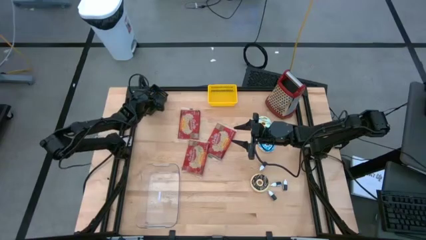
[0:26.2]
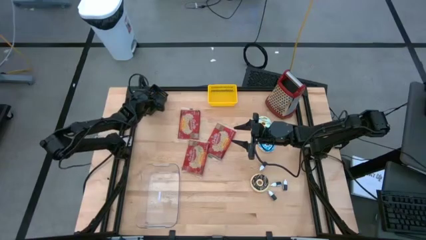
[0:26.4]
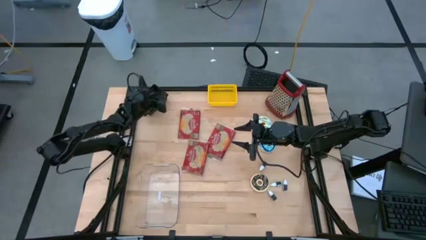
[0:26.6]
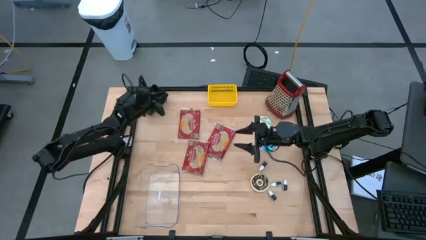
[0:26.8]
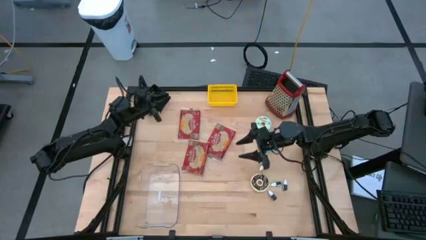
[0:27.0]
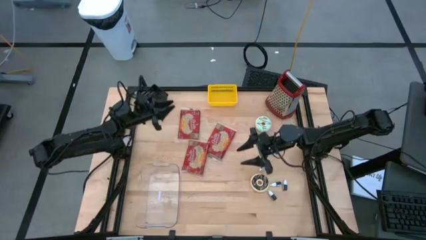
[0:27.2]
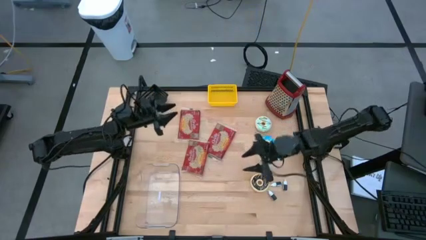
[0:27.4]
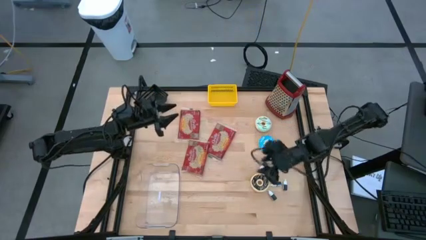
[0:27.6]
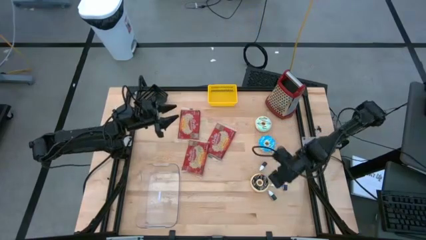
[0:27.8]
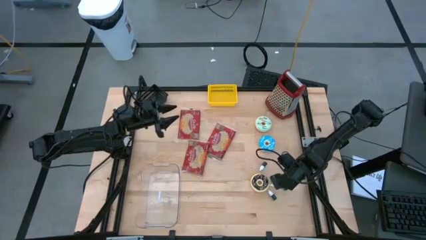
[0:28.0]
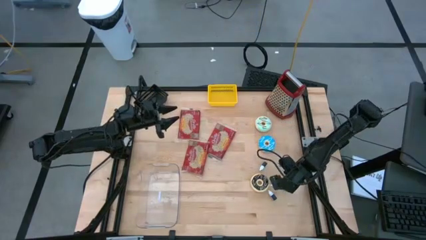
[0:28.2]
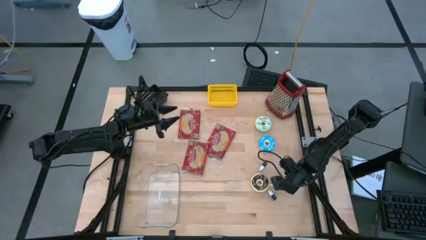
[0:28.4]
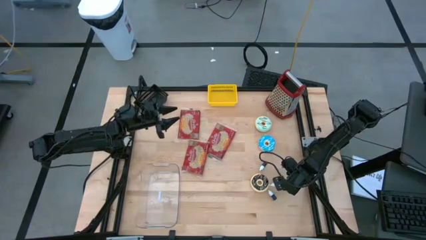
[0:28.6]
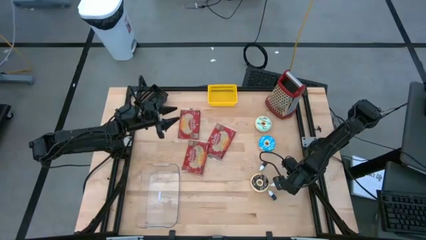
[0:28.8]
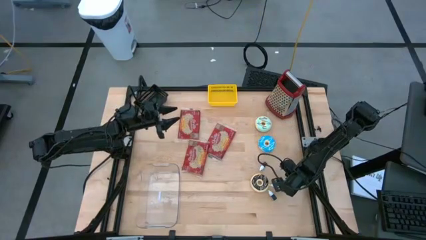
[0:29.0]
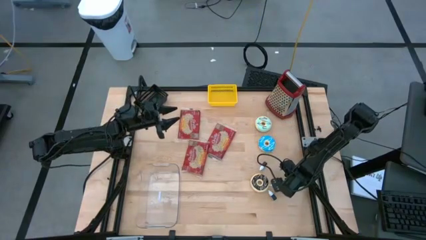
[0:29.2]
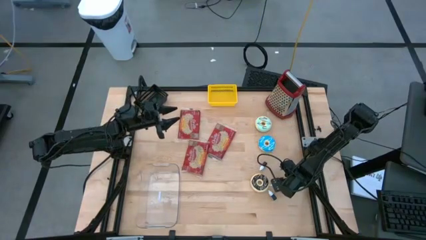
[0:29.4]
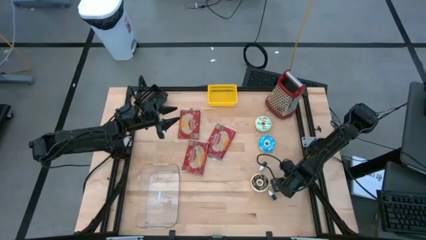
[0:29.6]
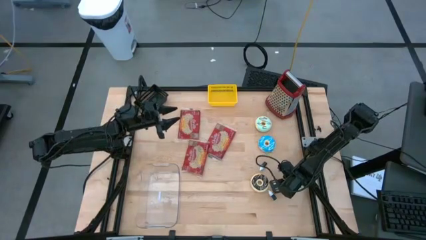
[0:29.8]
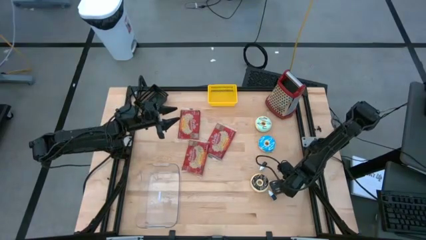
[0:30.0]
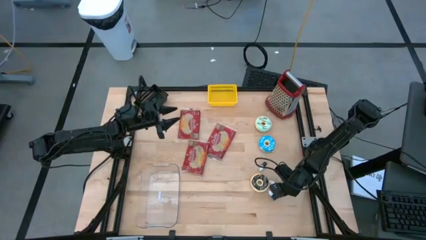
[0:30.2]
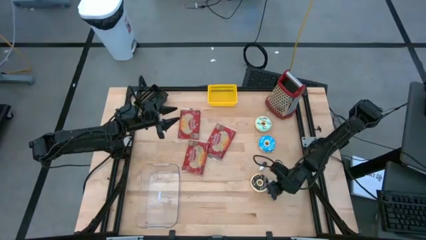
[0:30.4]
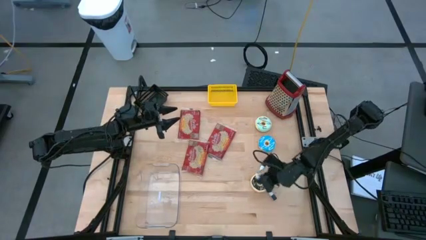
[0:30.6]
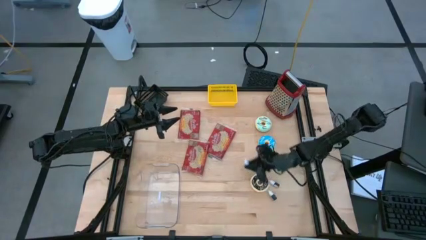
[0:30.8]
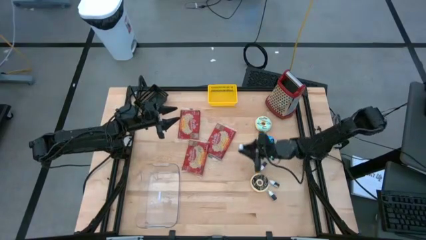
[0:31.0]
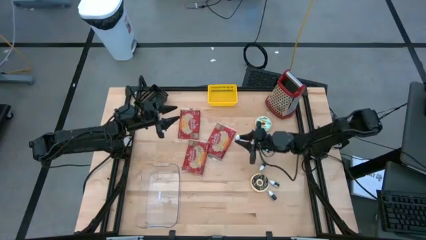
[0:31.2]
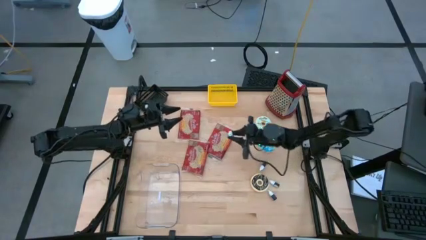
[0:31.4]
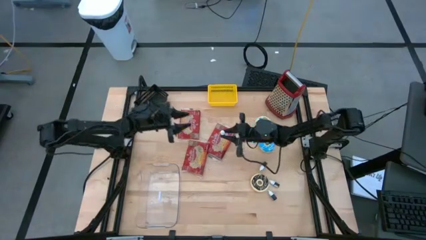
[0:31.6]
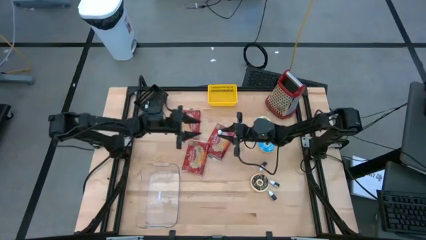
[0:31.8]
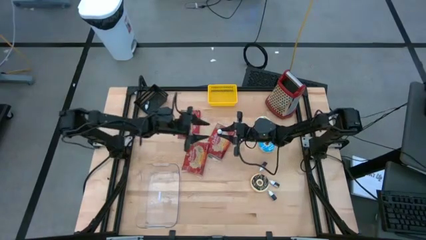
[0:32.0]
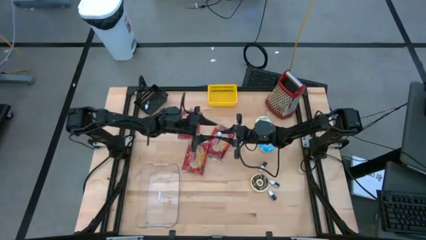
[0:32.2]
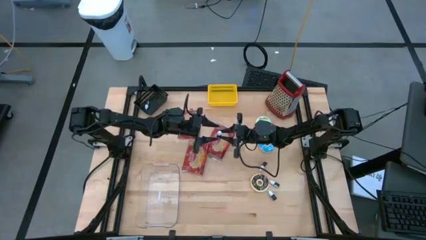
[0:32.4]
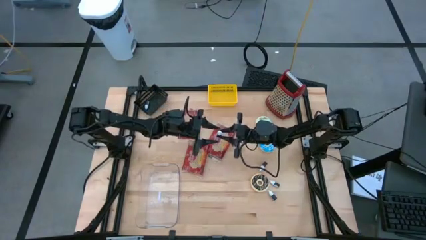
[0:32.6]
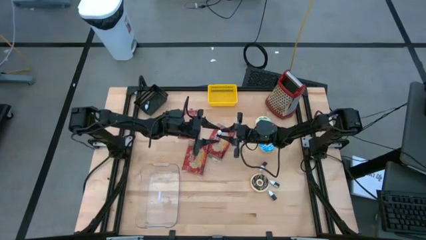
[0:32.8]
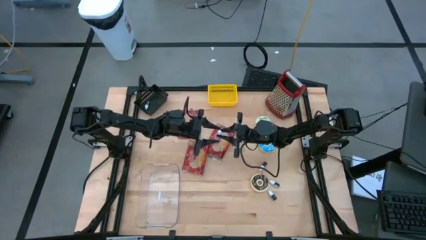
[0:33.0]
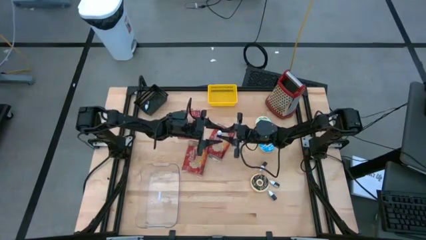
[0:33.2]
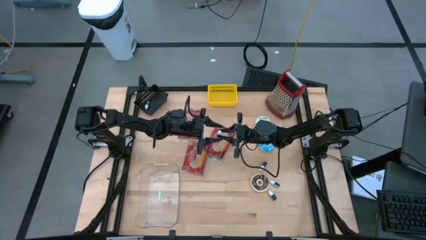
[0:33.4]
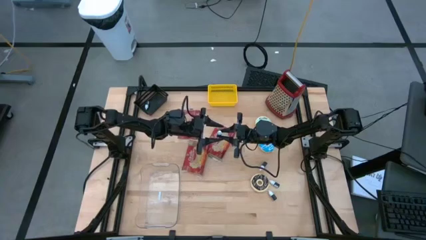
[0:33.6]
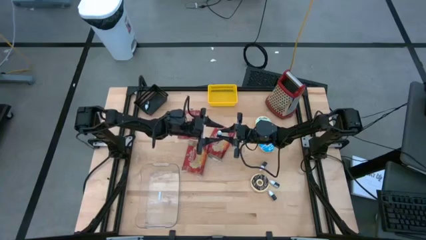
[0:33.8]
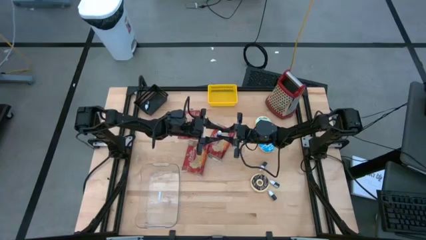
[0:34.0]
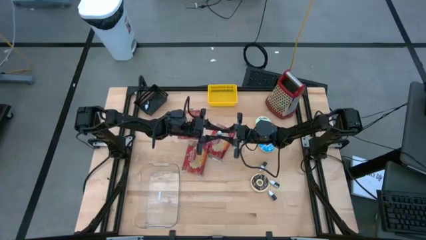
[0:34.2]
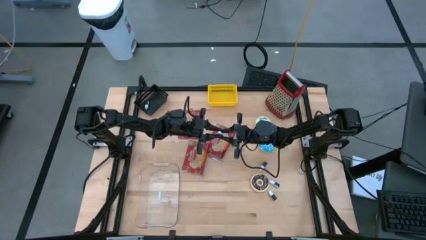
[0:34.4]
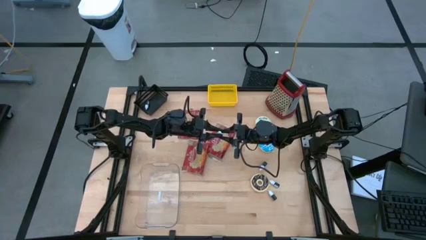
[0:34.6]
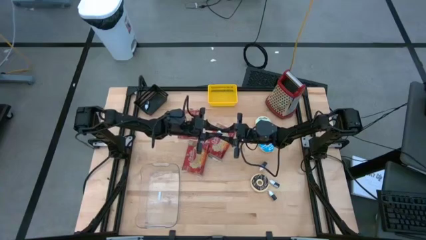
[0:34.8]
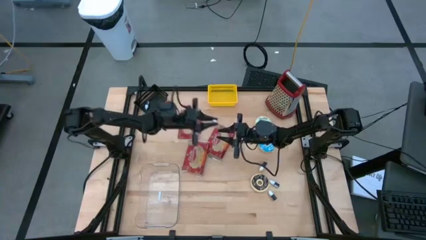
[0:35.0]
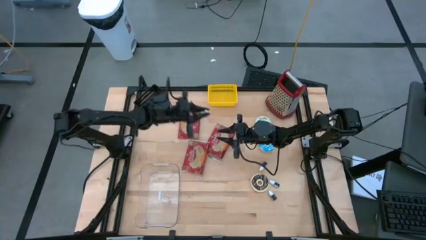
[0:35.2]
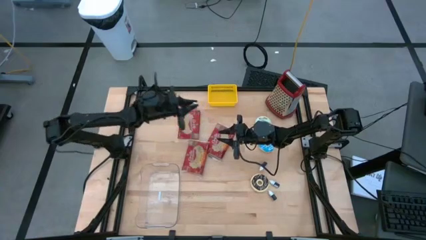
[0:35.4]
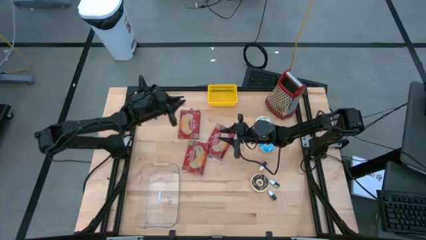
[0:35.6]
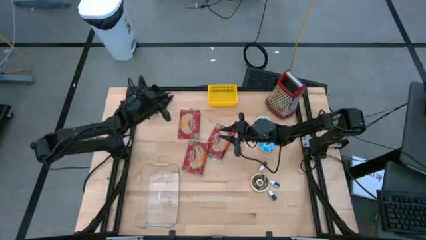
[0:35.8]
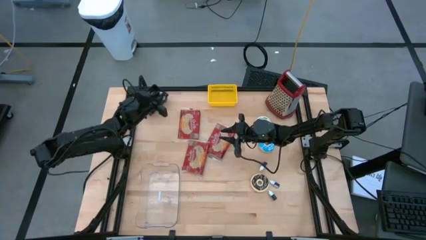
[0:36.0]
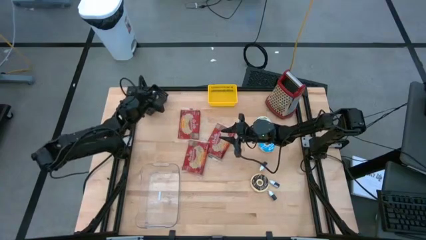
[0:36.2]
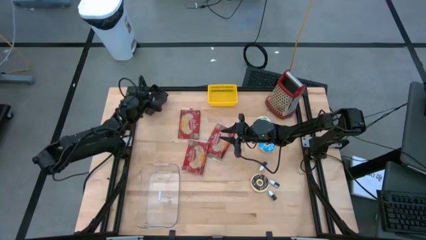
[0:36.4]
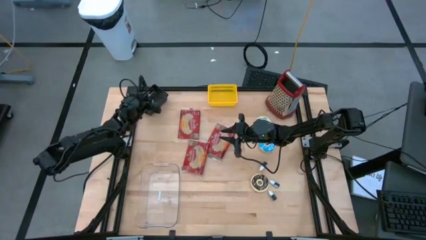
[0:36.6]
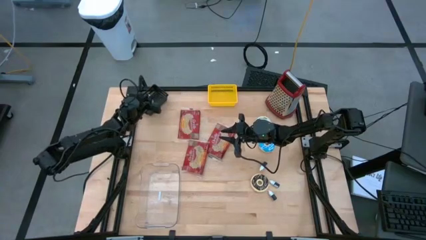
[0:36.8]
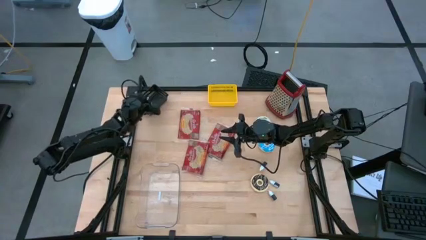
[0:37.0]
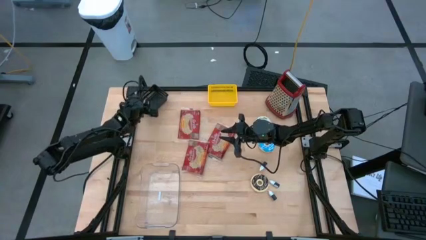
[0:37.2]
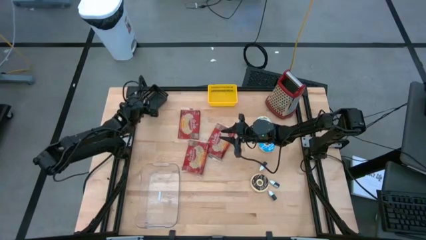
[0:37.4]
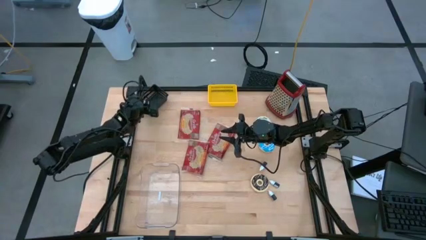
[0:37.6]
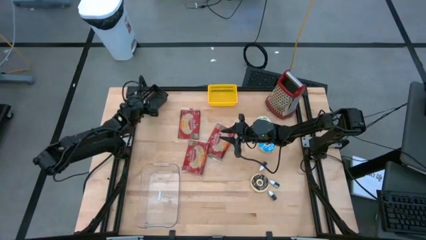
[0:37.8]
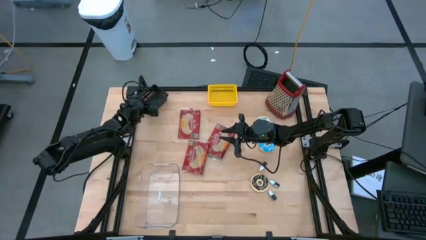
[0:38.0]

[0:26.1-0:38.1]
Put the dark green food coloring bottle into the black bin

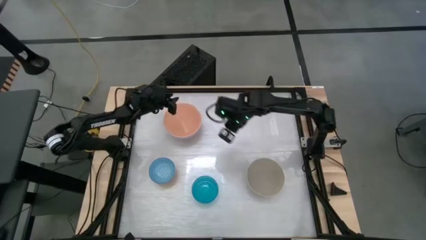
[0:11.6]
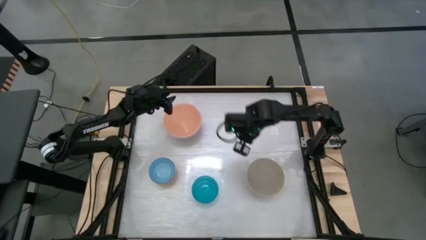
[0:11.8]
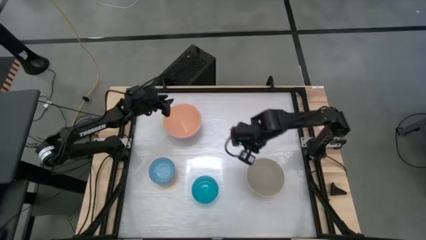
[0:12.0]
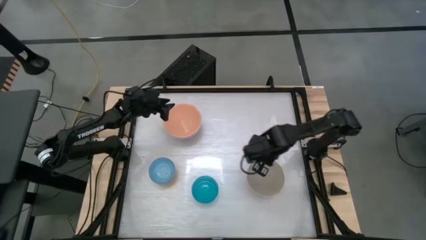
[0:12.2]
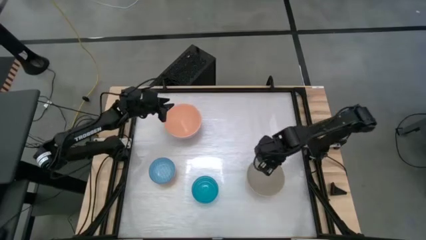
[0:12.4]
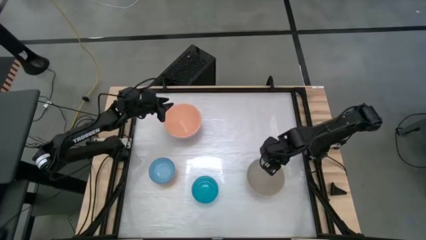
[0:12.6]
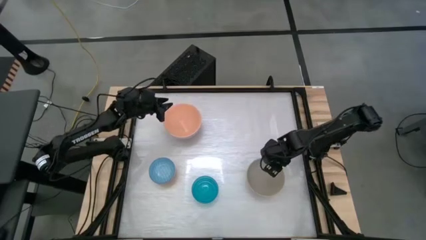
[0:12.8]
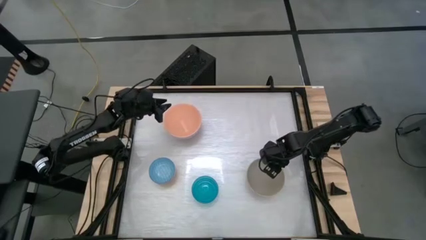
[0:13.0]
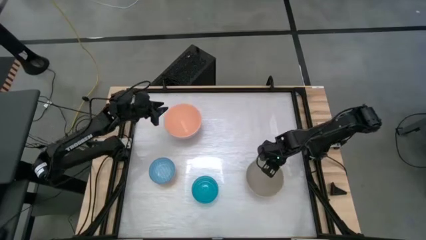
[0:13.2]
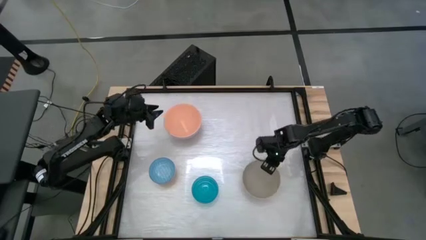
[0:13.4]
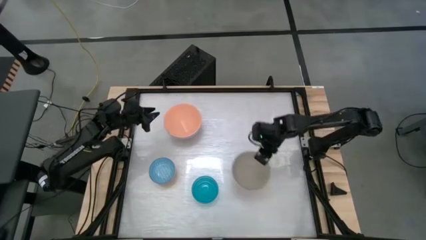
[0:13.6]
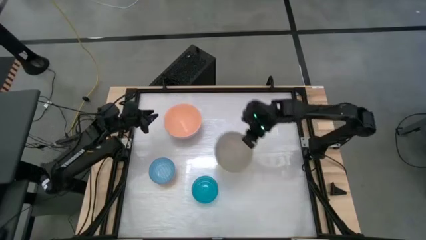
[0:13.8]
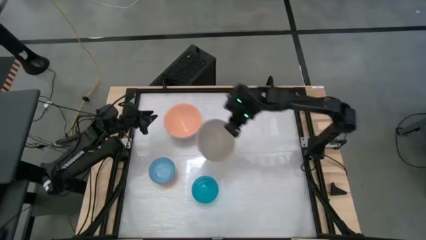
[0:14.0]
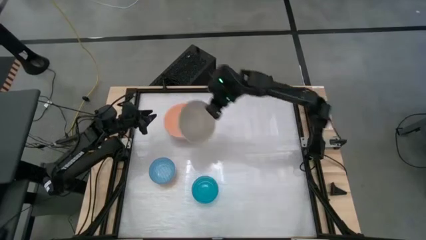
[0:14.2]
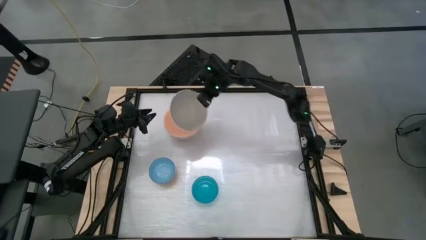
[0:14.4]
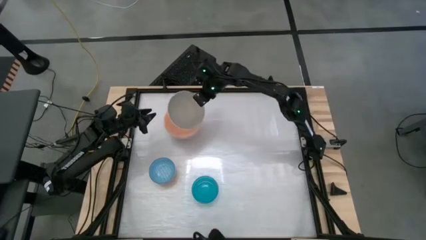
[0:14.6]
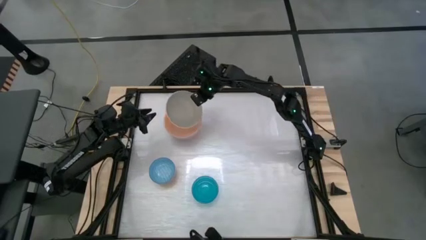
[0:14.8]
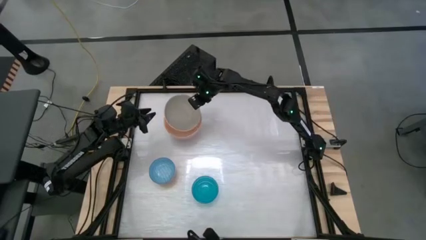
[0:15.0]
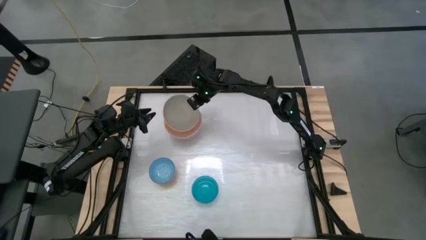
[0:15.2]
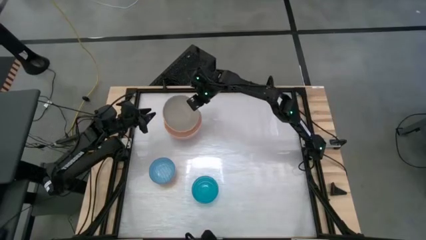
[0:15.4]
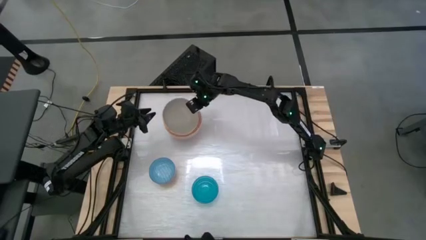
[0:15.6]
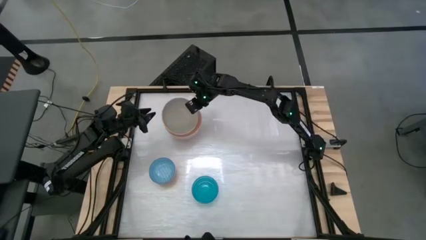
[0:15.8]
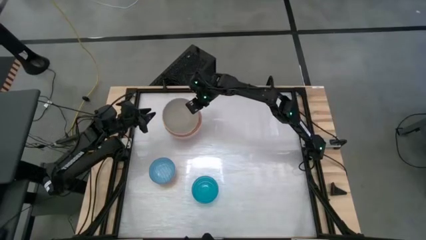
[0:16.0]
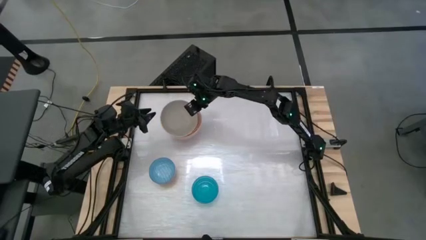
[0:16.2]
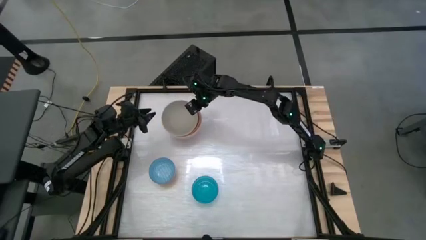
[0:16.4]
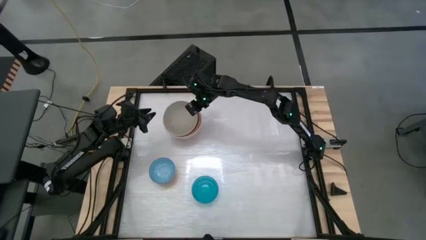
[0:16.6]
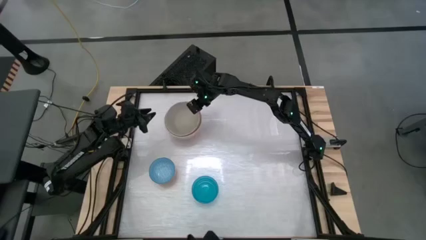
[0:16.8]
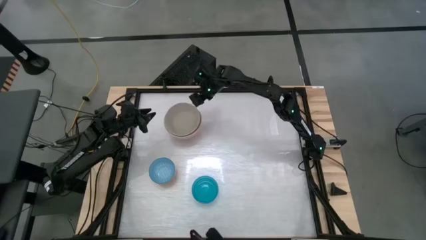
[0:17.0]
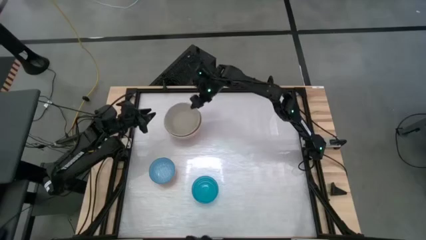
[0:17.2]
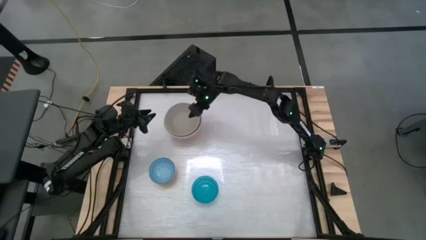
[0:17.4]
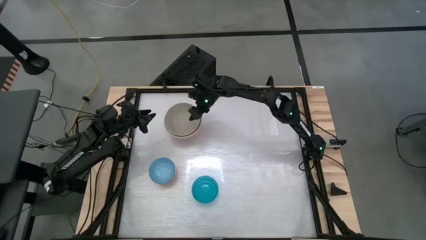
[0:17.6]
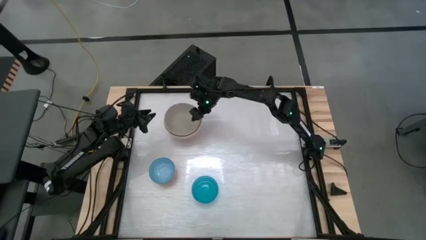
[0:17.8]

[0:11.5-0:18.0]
Stack the gray ceramic bowl on top of the orange bowl
